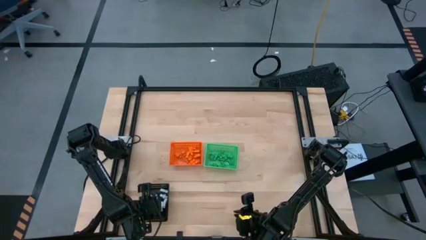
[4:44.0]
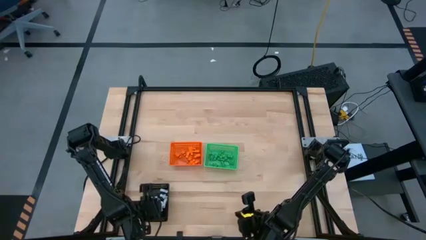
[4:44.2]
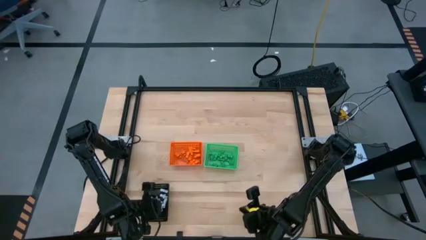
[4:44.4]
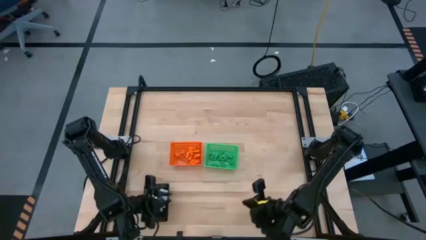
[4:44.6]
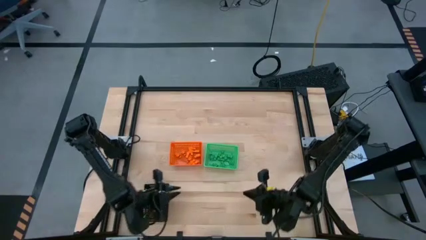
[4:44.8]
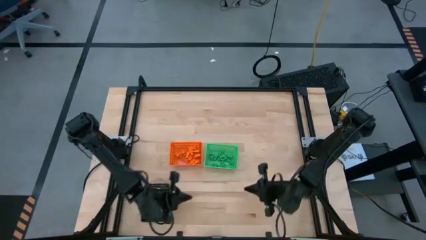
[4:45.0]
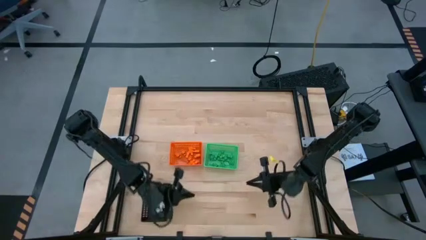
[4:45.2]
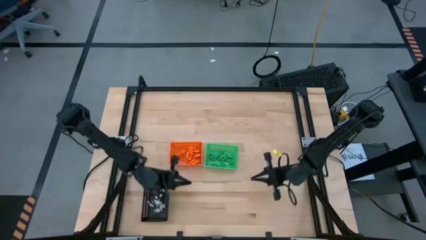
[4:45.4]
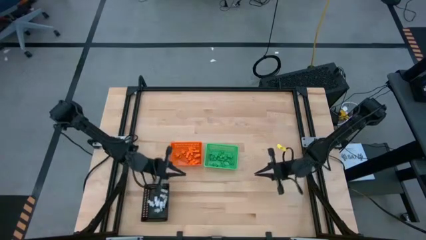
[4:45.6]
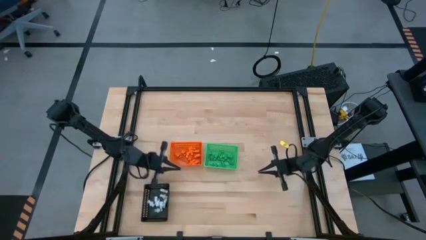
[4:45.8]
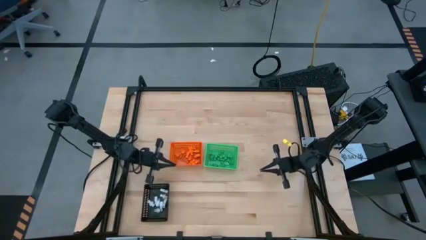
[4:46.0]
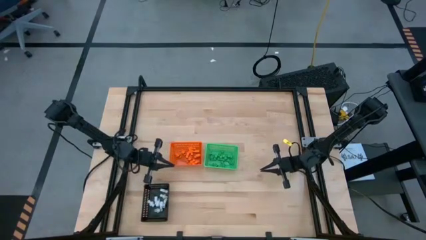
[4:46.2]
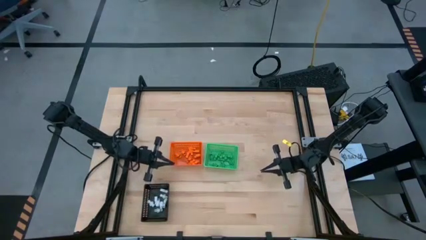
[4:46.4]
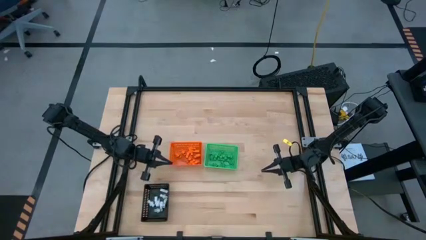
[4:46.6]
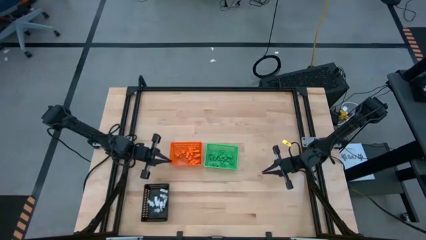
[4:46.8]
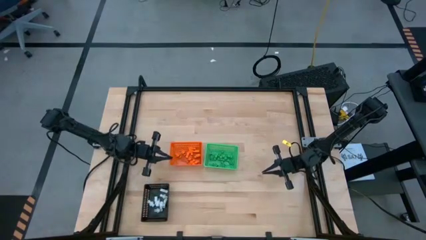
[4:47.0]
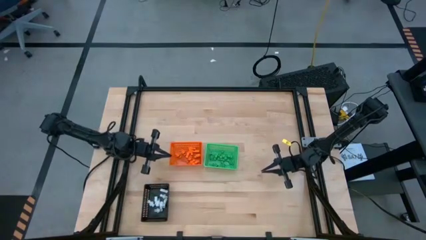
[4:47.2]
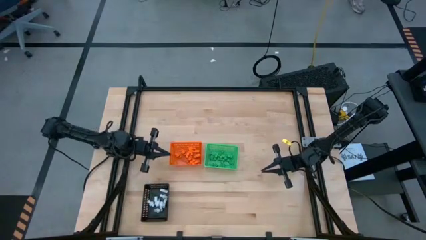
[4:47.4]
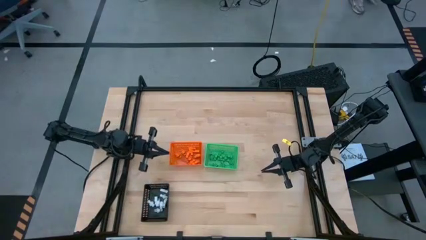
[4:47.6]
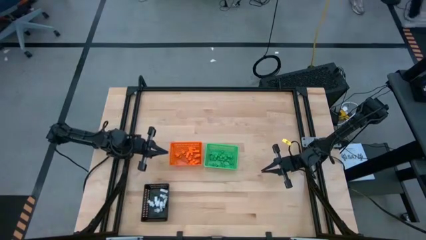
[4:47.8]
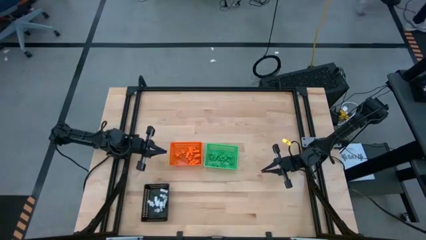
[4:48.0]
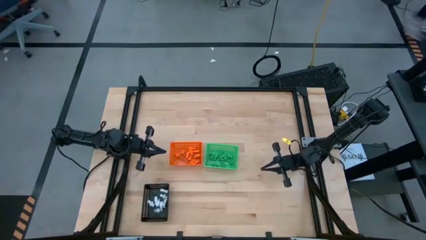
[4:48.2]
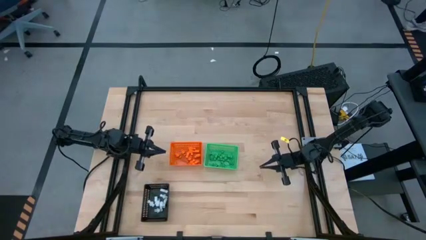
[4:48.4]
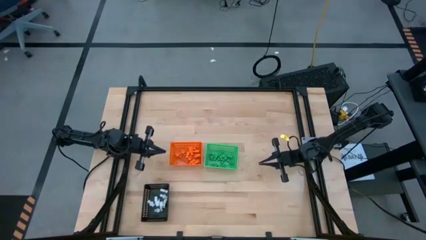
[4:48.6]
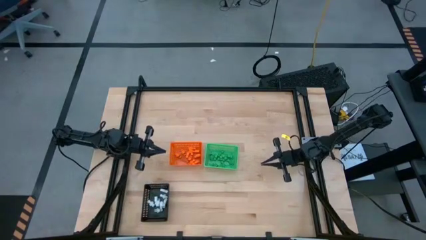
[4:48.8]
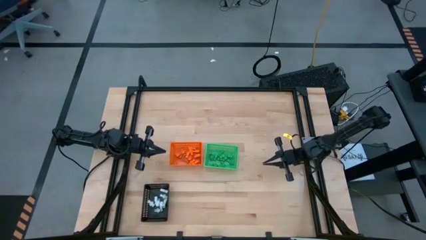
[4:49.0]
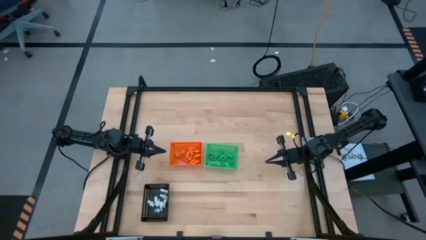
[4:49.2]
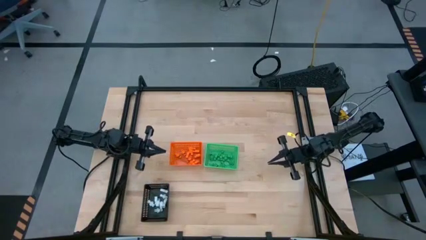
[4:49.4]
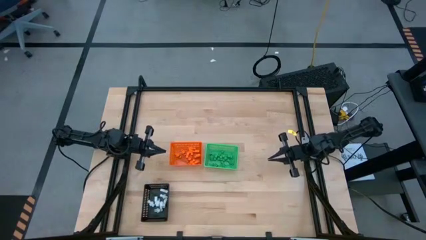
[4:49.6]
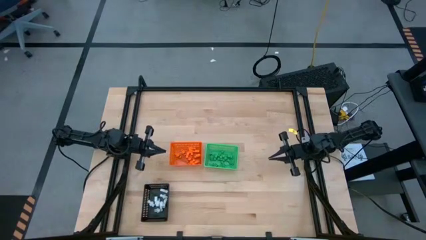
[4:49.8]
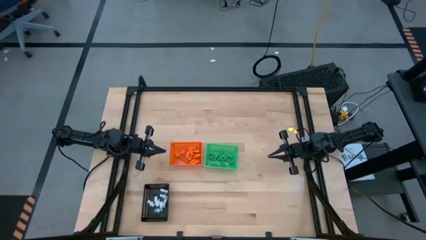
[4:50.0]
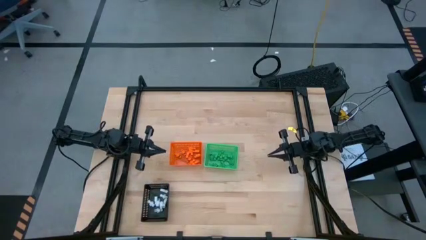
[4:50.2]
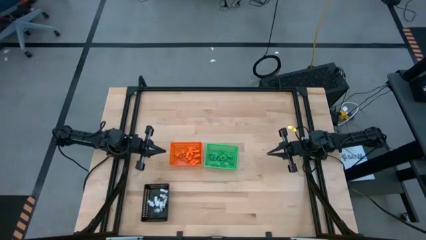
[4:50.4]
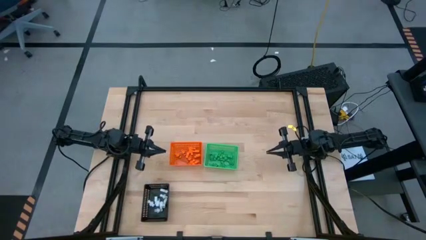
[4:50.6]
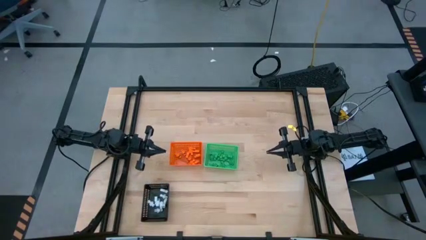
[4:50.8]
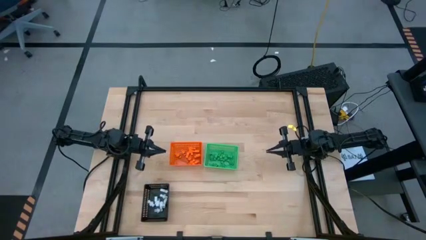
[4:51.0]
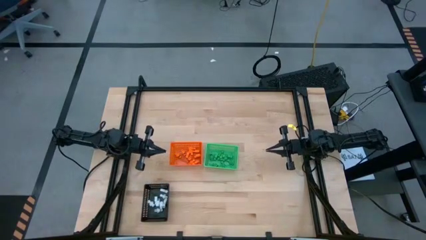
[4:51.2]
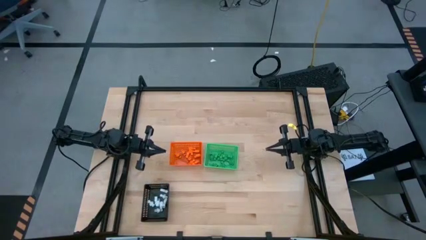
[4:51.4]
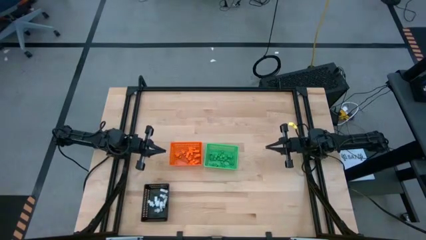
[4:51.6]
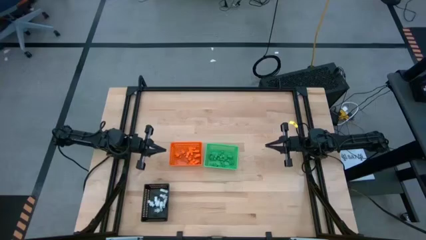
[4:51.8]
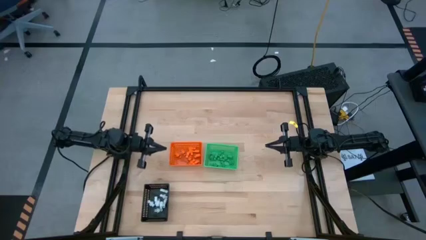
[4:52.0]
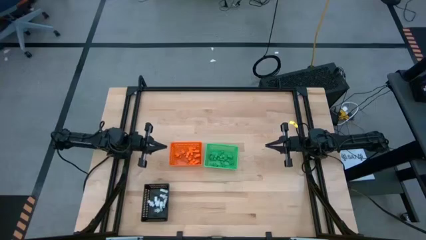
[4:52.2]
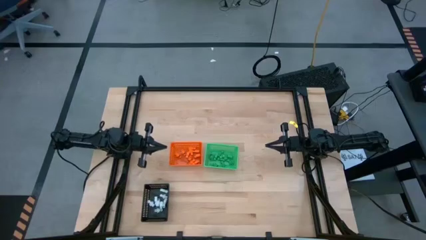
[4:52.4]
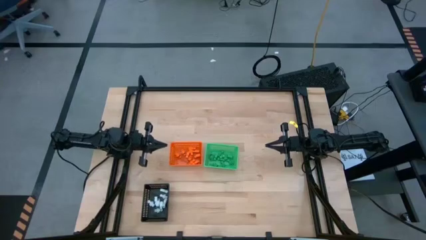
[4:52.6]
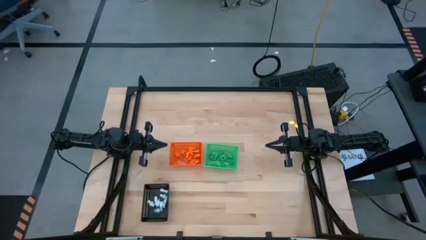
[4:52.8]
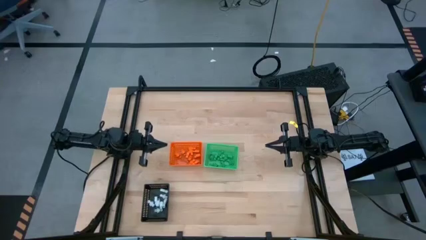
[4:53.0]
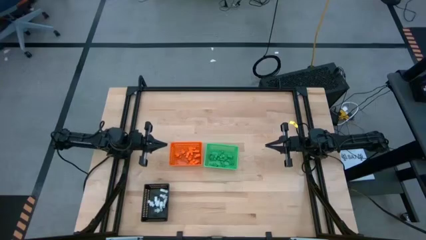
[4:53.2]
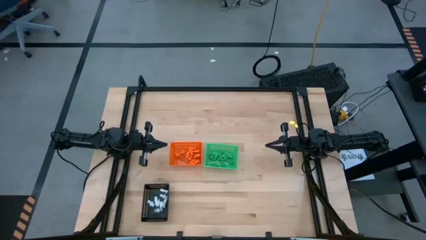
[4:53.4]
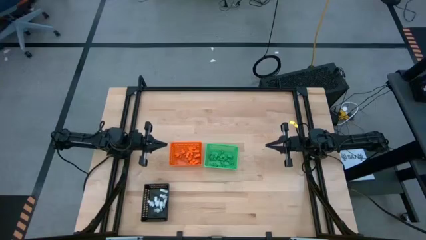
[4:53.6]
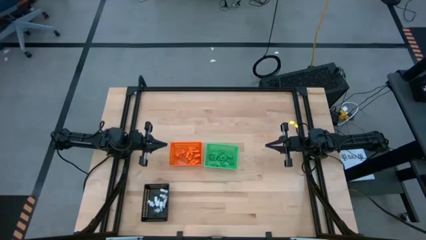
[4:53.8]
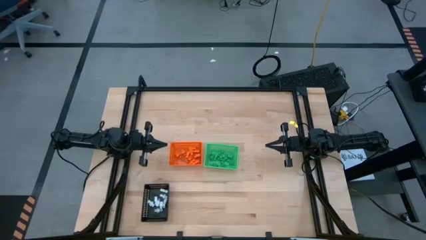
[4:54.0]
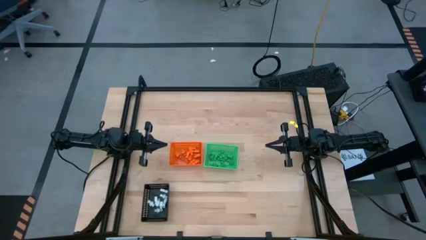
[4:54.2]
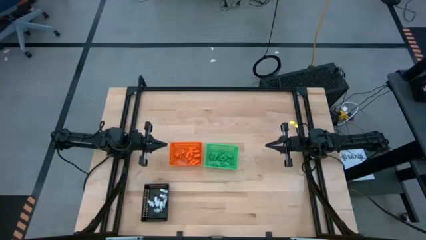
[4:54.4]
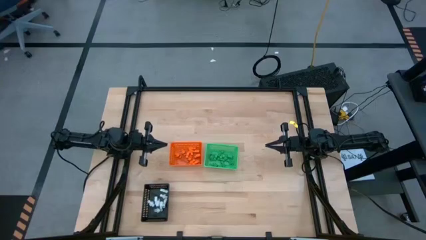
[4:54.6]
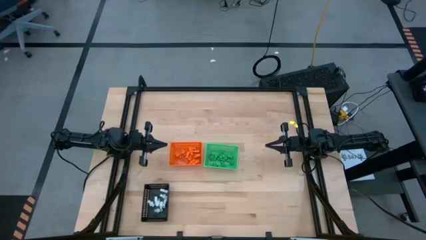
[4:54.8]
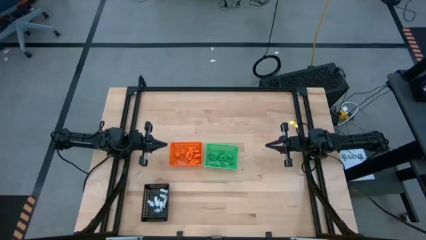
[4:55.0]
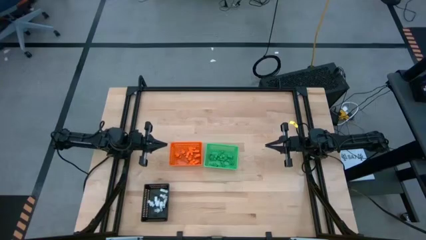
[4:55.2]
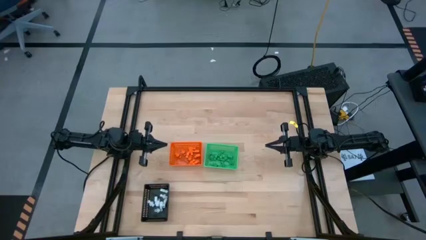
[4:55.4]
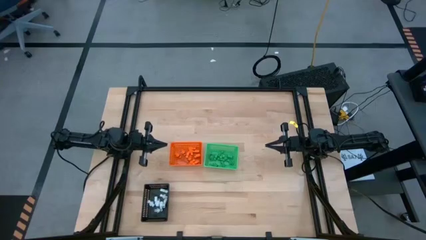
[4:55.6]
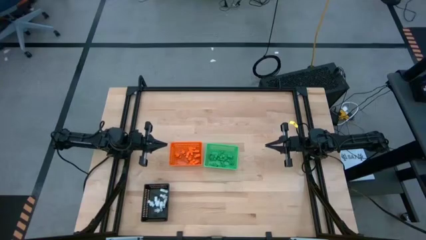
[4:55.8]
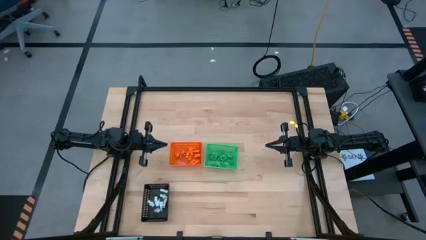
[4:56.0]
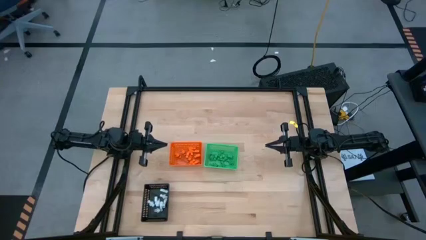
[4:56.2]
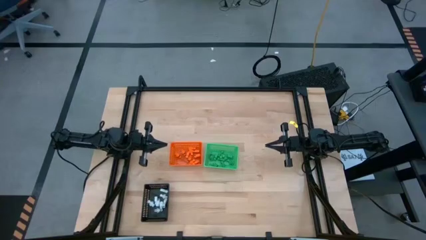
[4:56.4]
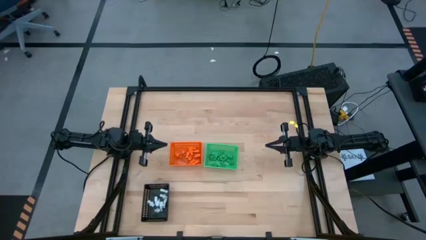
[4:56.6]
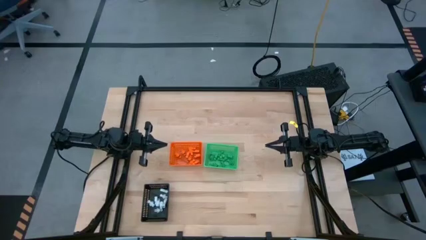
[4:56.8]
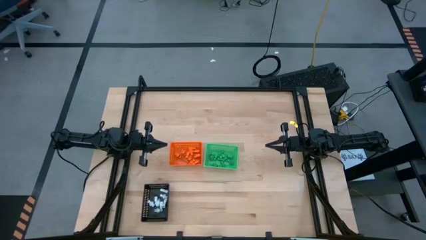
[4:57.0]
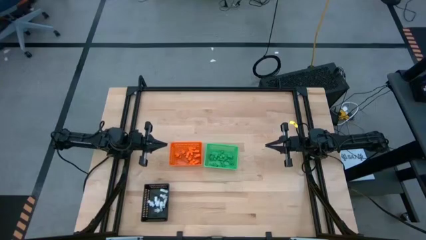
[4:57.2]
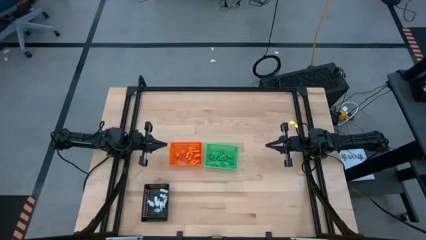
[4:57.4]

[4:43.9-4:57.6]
Task: Sort Halloween decoration
Return to Home Position
